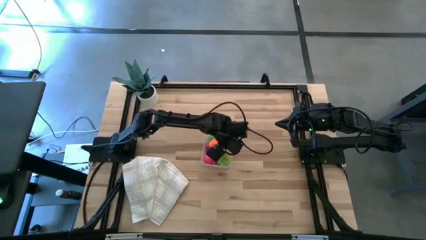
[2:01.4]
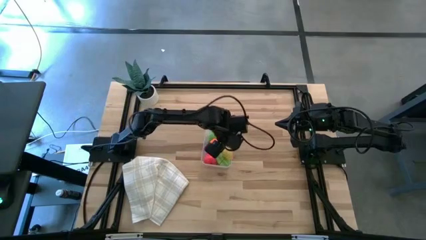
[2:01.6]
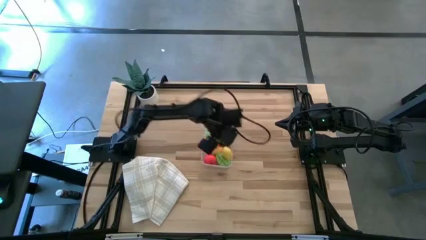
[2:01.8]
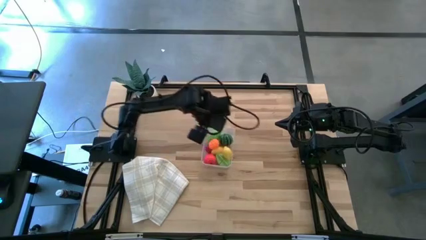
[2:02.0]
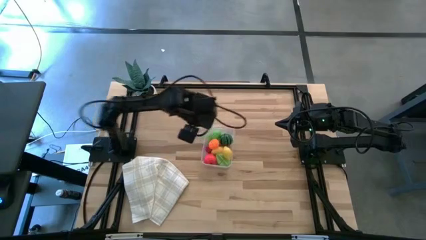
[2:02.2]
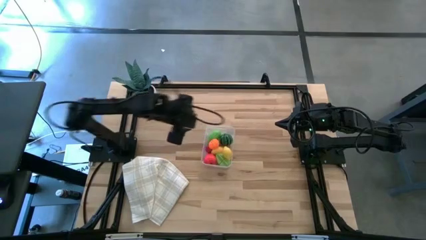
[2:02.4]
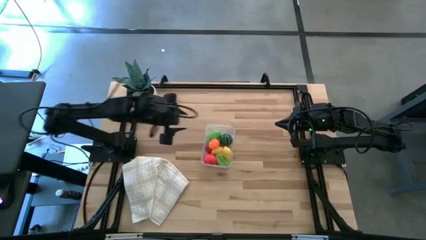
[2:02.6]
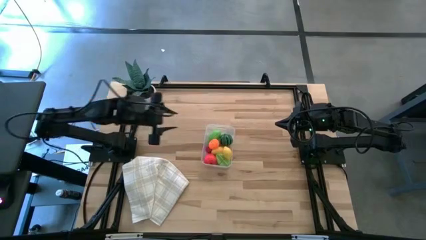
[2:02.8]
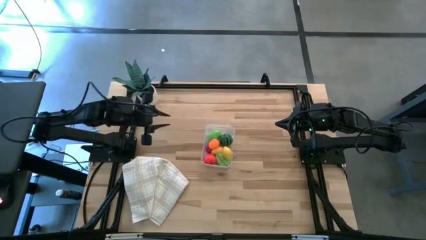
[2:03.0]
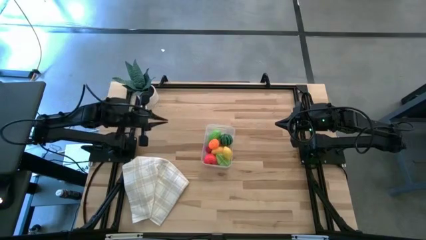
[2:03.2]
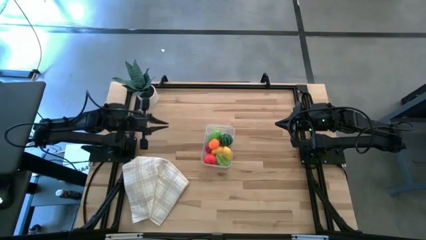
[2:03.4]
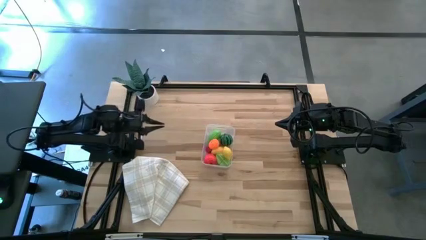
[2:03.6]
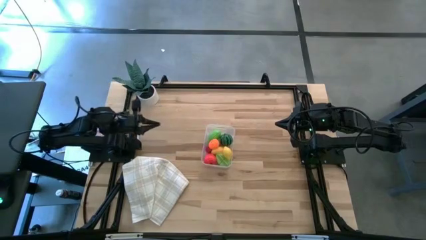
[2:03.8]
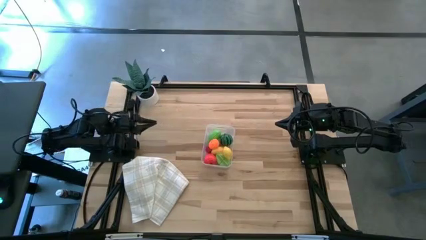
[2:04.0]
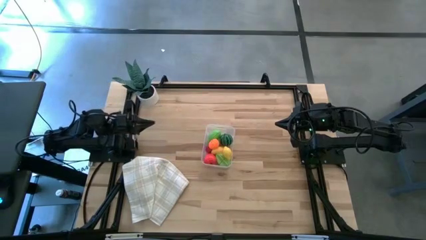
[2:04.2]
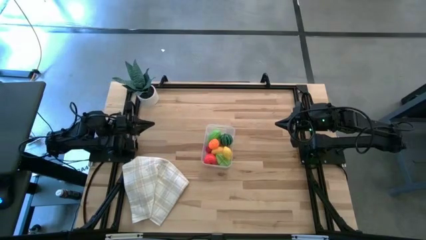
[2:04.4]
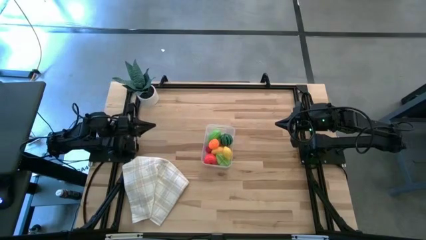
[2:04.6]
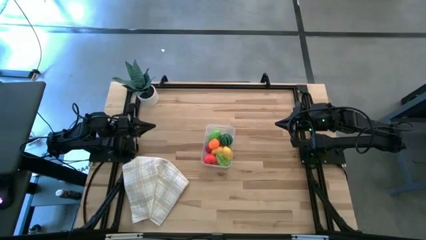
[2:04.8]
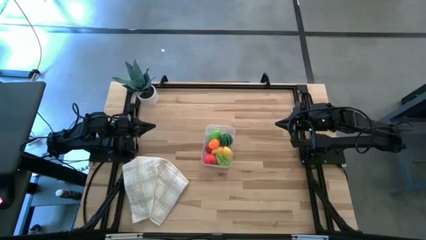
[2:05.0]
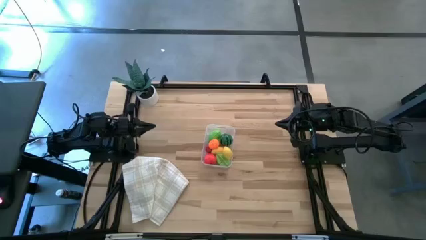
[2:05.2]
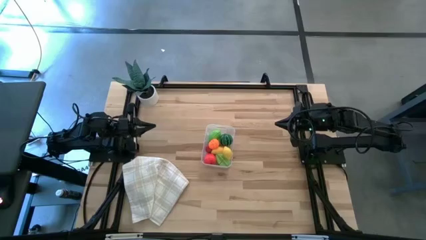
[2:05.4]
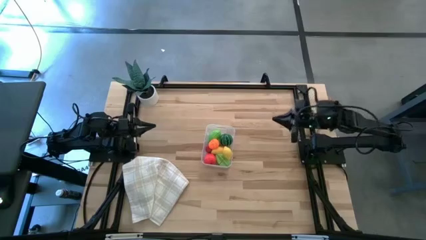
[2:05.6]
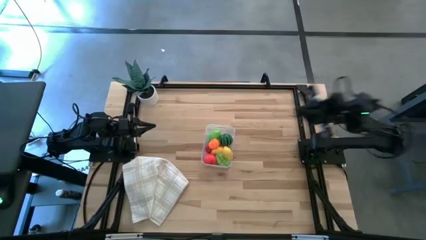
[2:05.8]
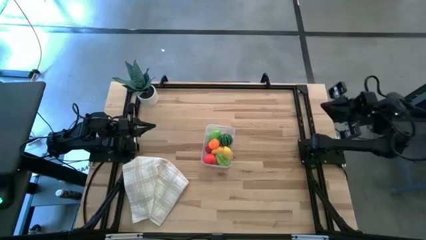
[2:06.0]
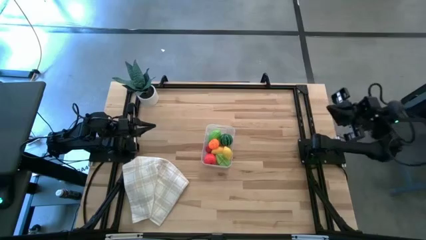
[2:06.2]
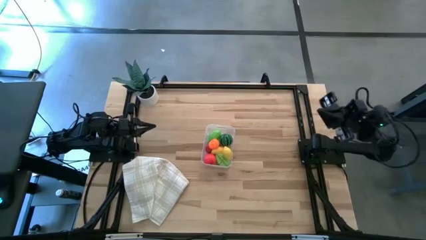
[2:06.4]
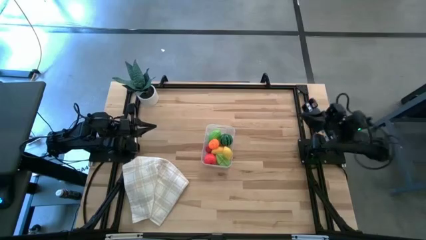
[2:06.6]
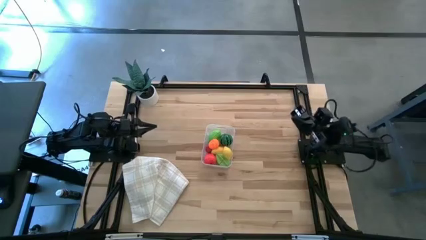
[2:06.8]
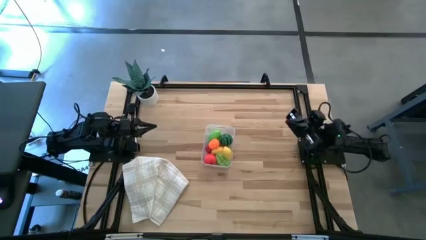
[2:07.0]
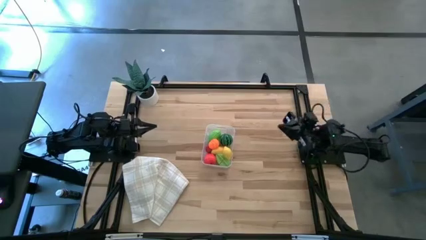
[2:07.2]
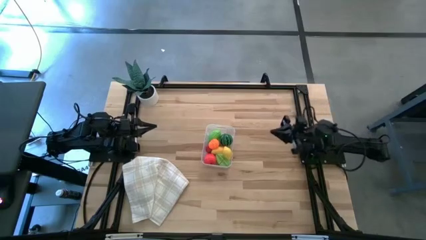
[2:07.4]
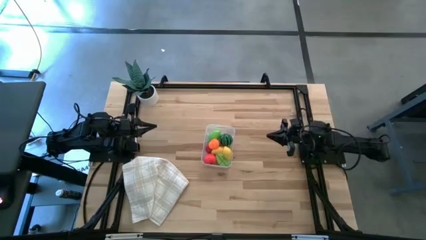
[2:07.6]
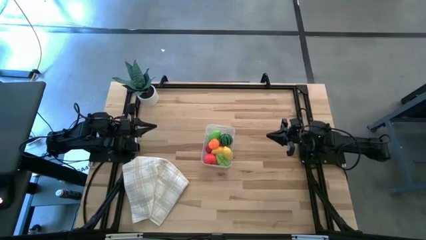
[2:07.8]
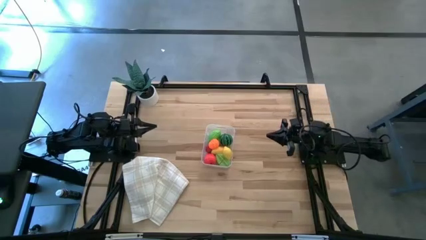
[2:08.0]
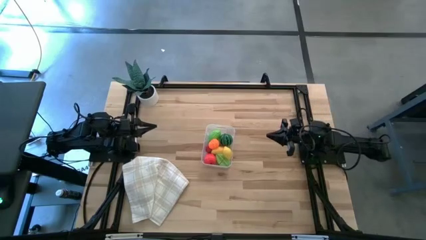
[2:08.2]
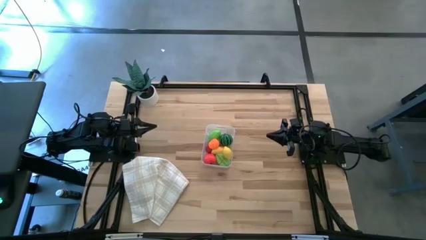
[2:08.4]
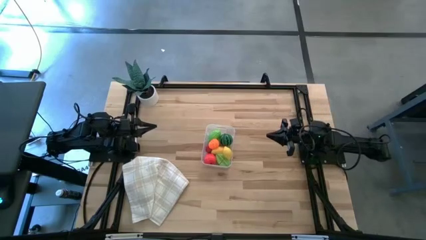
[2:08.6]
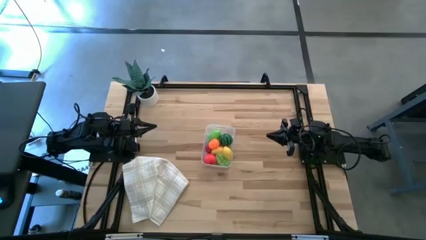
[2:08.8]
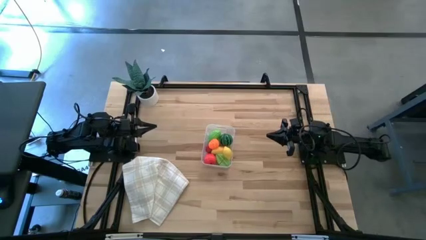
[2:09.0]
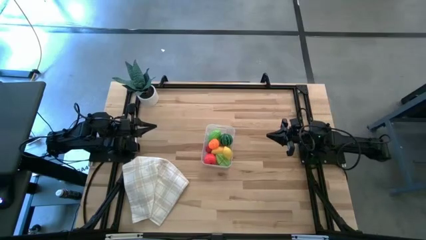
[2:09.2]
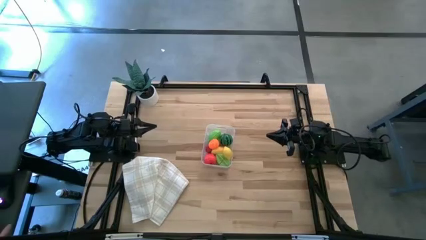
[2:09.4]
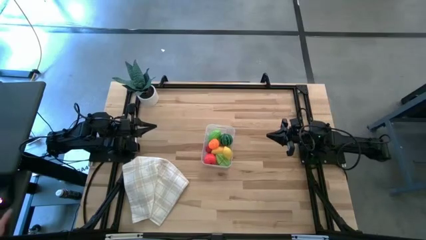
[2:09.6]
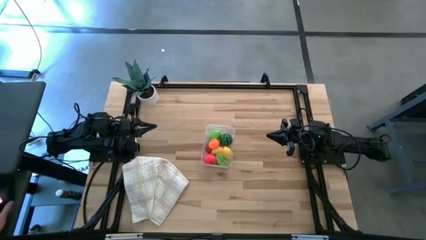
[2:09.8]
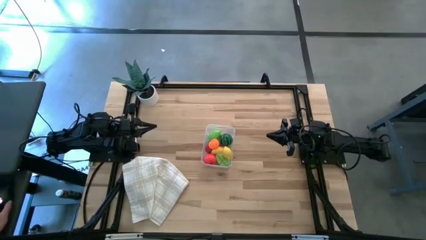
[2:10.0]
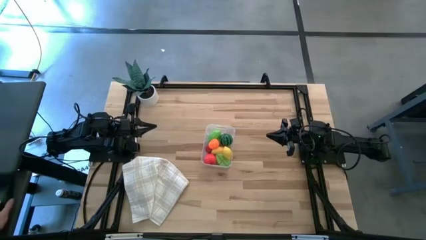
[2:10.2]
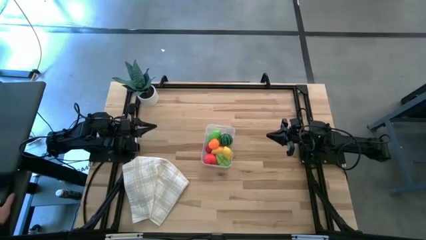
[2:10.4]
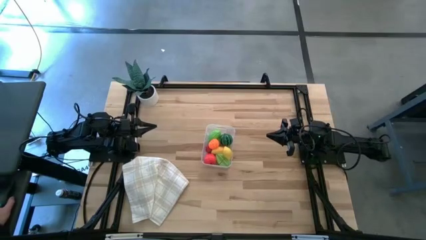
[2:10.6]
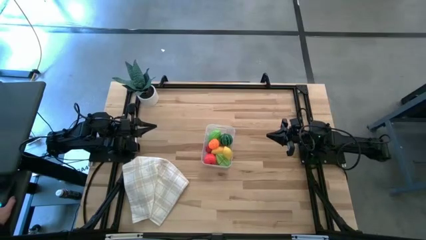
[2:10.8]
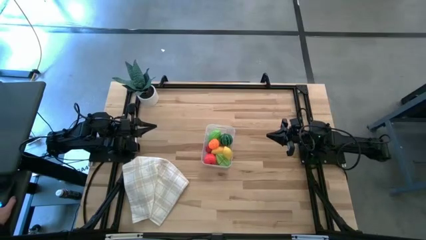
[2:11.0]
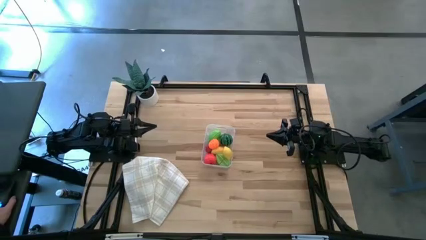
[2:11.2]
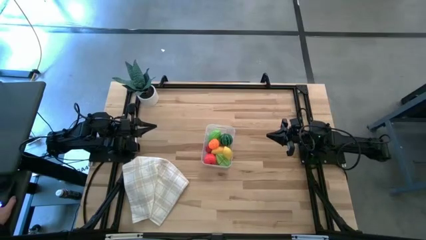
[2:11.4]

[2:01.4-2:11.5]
Task: Pick and placing Produce into tupperware
Return to Home Position

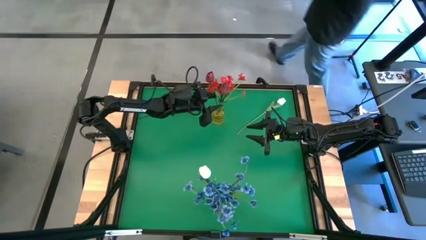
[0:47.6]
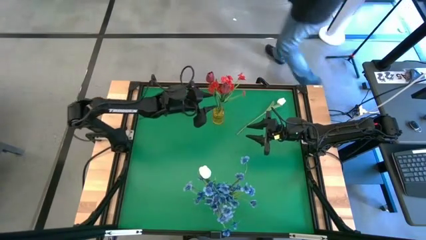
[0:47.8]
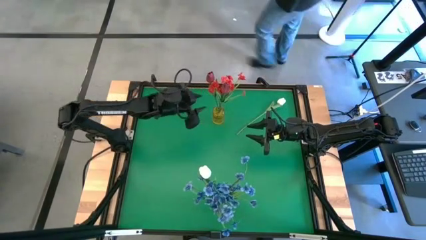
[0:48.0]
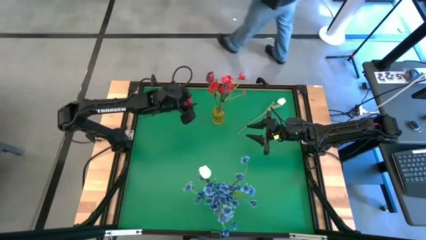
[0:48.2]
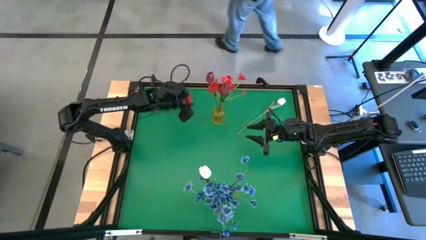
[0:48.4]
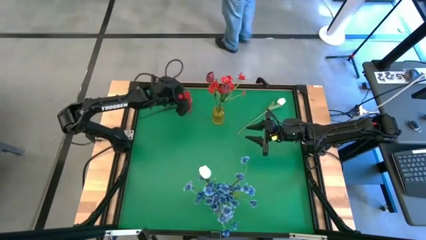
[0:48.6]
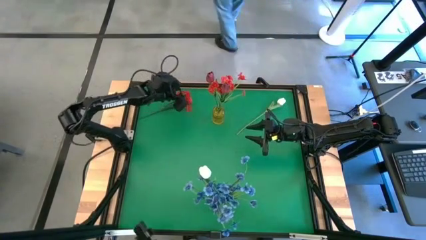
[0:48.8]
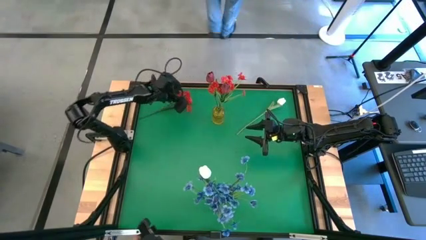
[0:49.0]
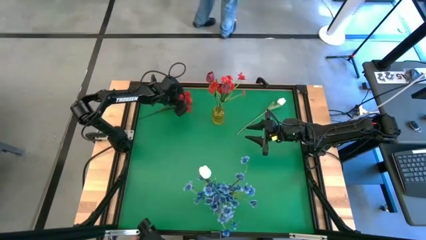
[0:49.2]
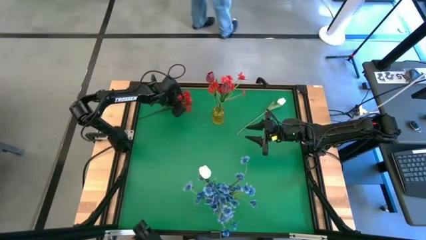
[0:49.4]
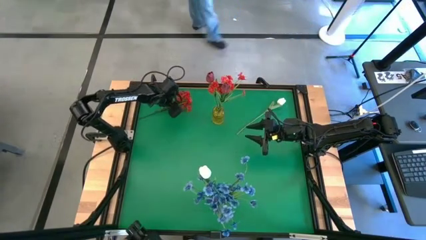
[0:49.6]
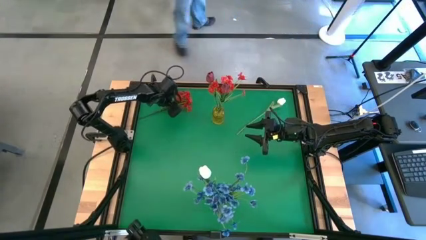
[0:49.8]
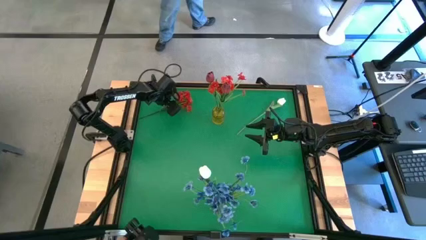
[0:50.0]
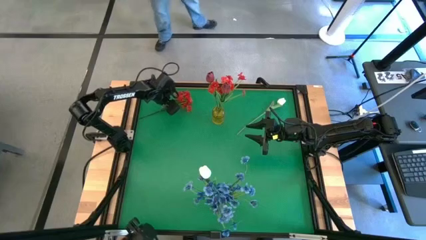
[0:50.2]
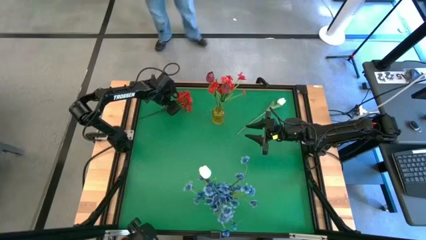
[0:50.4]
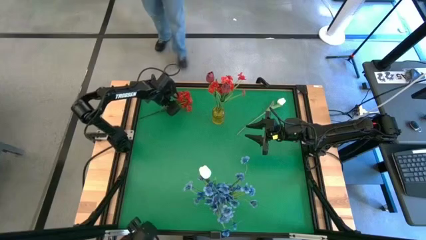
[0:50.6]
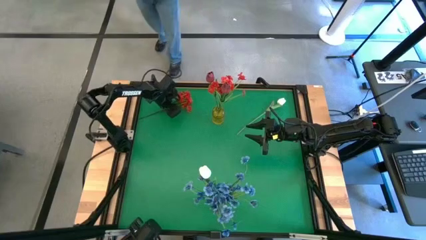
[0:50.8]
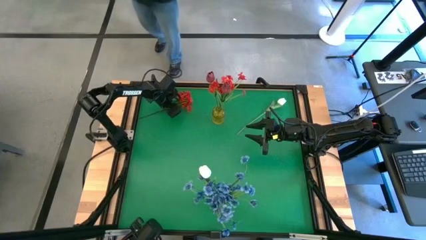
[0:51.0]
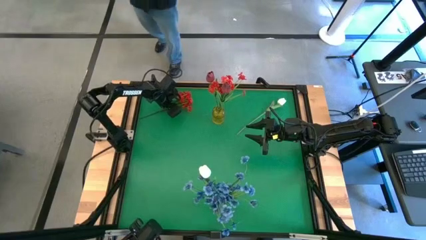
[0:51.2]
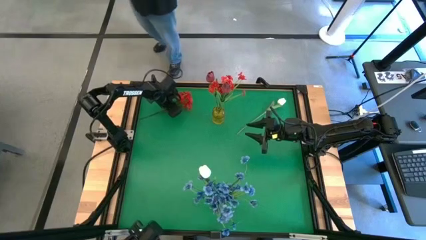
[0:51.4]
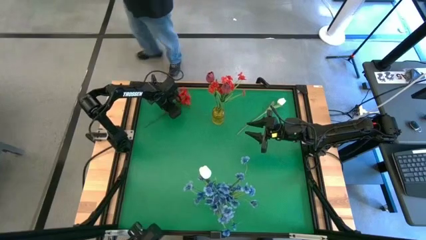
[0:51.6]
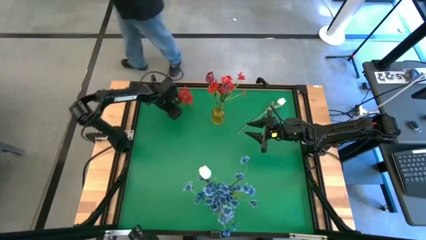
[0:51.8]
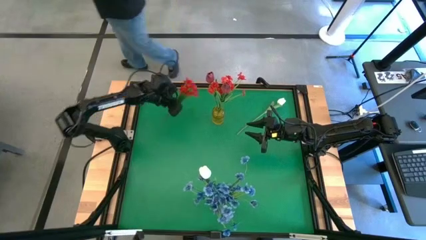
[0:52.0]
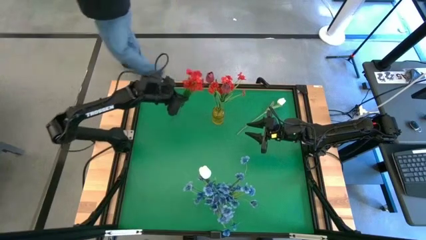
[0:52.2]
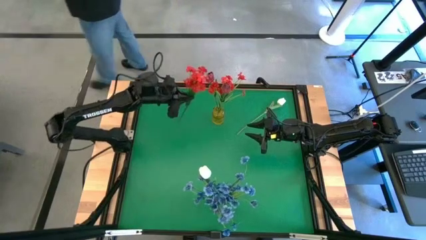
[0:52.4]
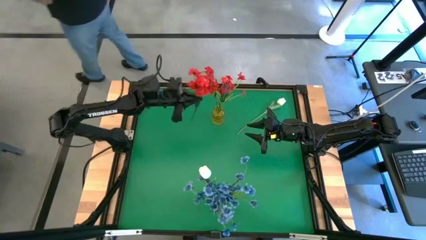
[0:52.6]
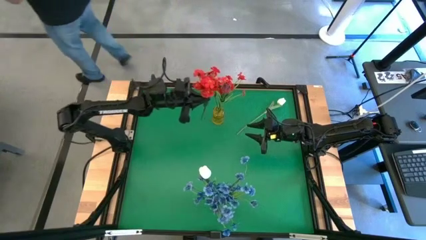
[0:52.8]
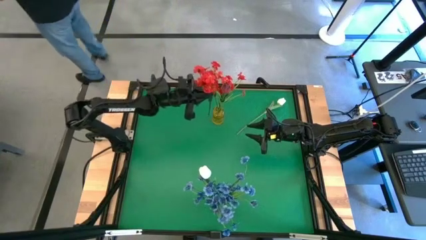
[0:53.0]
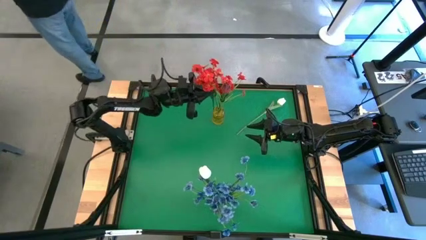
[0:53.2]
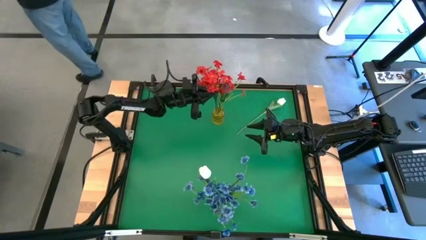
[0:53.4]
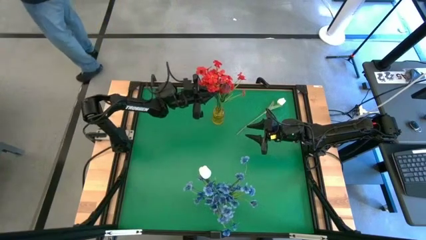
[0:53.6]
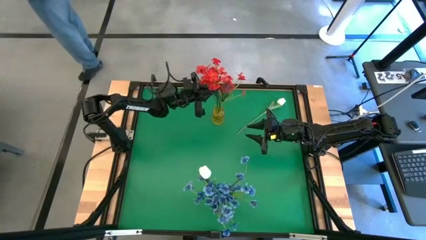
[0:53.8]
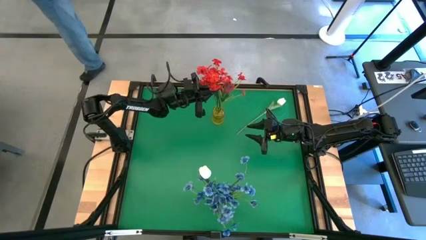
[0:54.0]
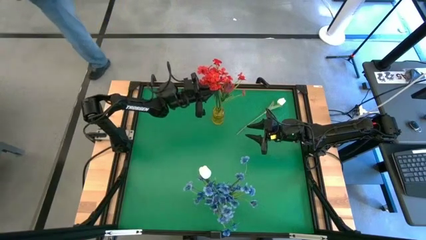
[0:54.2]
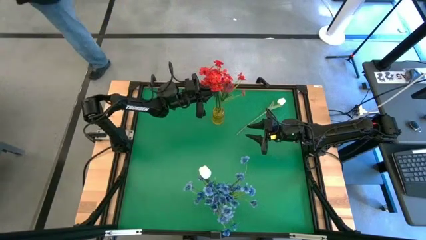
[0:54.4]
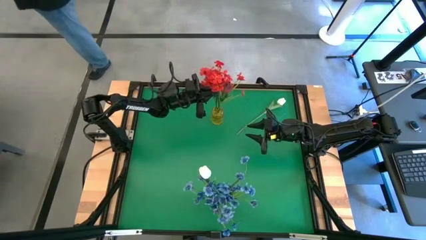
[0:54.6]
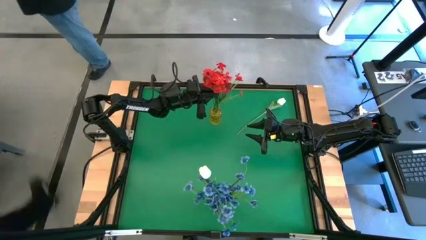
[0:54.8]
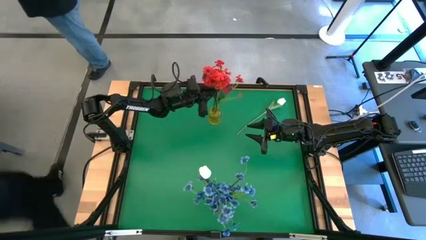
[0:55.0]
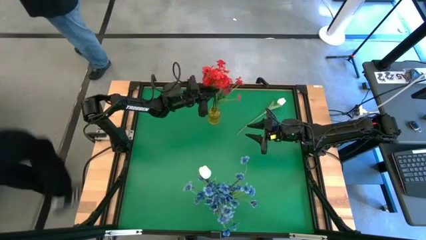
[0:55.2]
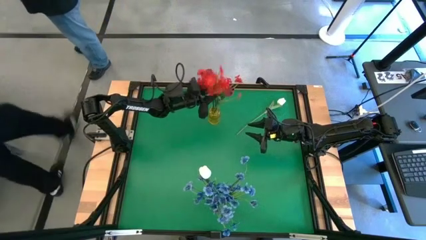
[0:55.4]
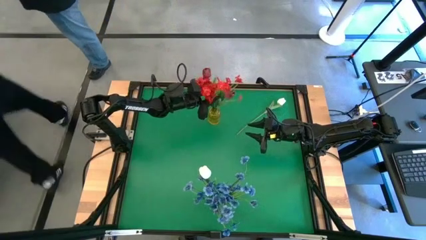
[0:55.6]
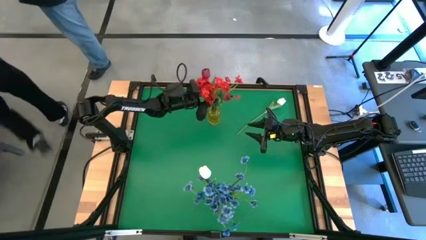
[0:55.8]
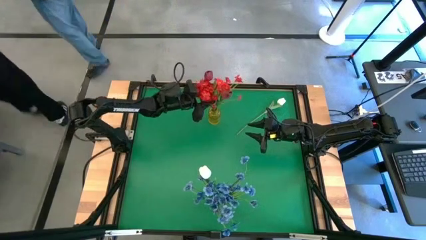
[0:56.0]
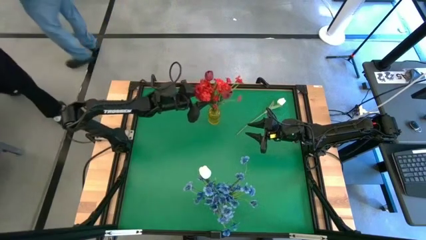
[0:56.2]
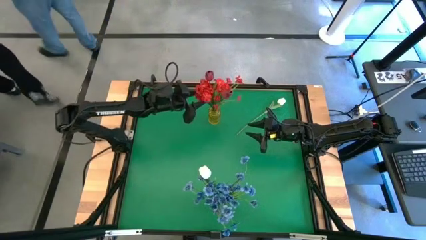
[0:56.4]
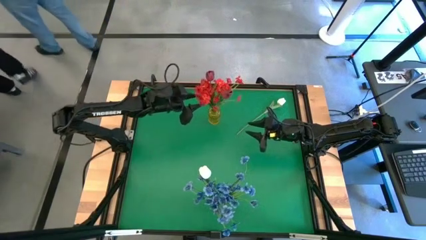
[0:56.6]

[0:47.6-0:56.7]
Task: Sort flowers into vase by color
Put the red flowers into the yellow vase
